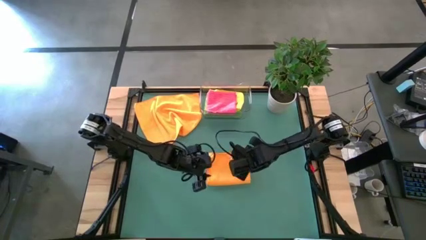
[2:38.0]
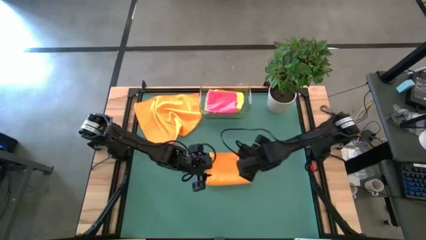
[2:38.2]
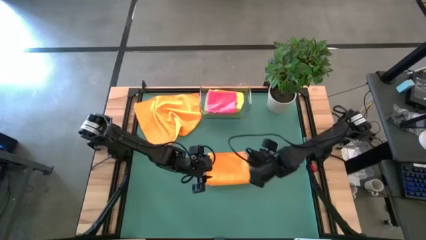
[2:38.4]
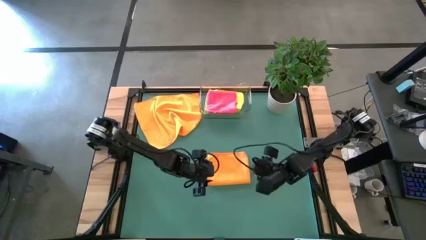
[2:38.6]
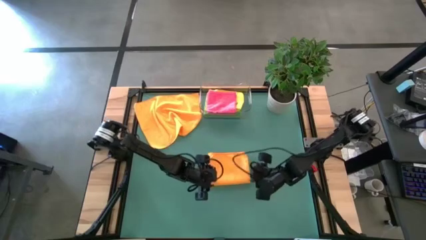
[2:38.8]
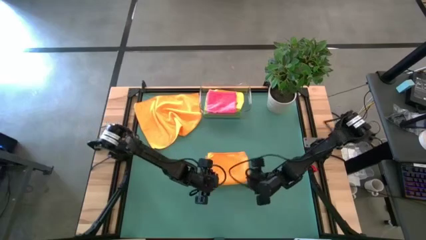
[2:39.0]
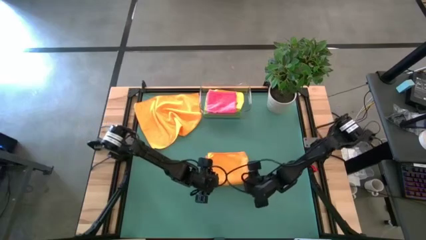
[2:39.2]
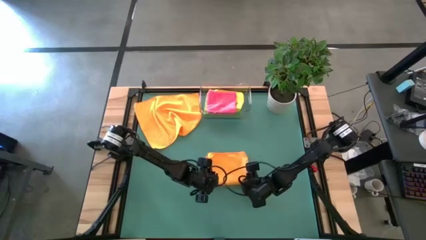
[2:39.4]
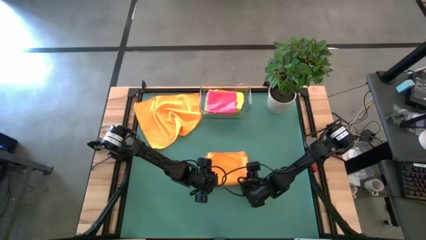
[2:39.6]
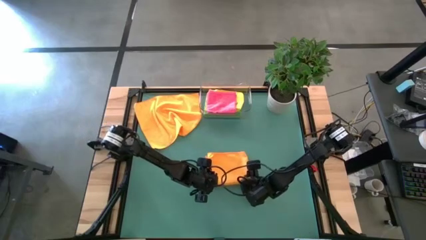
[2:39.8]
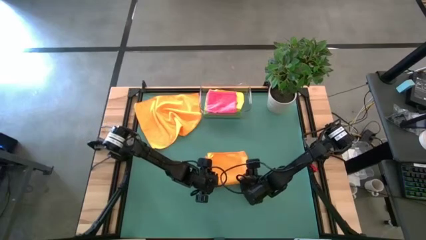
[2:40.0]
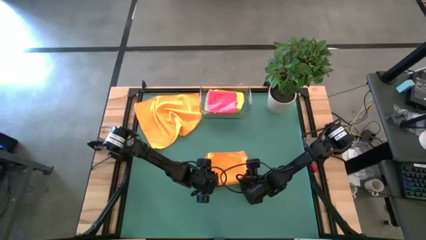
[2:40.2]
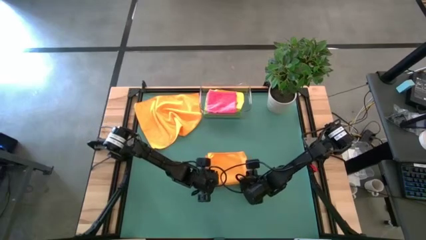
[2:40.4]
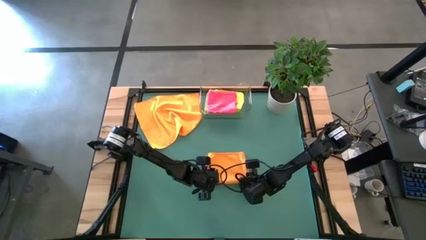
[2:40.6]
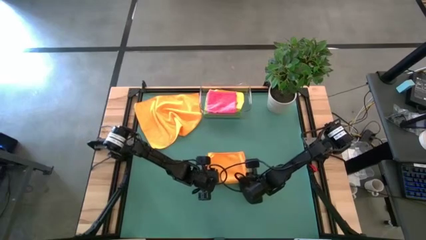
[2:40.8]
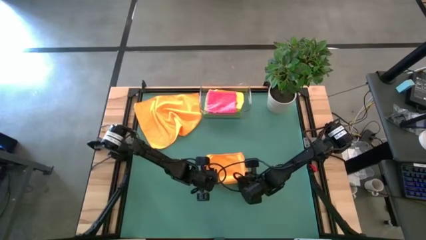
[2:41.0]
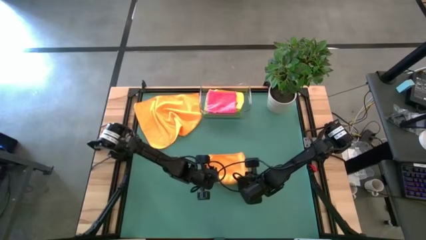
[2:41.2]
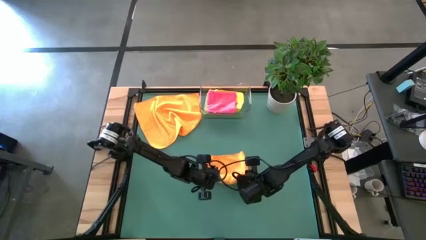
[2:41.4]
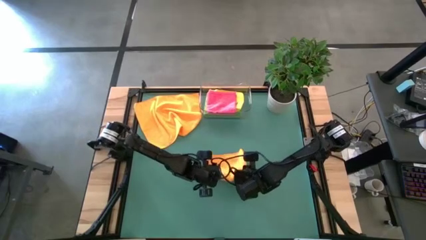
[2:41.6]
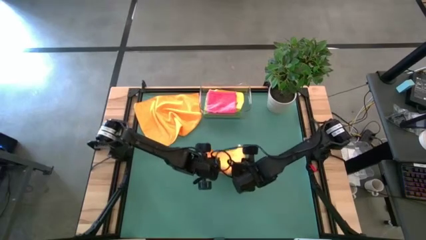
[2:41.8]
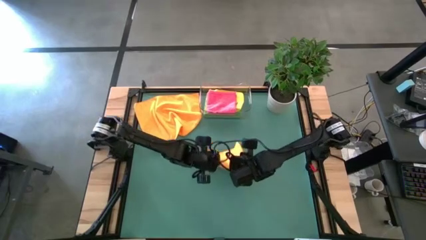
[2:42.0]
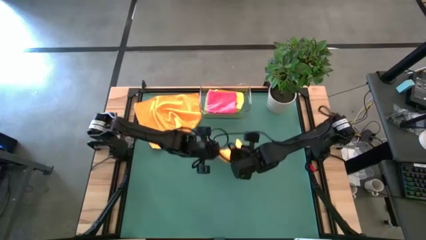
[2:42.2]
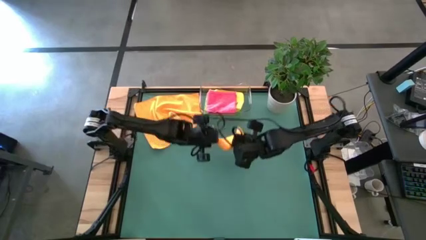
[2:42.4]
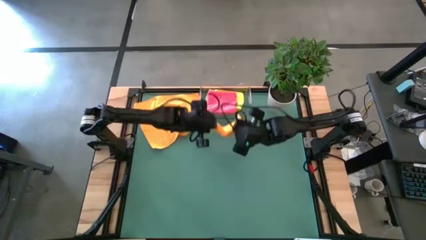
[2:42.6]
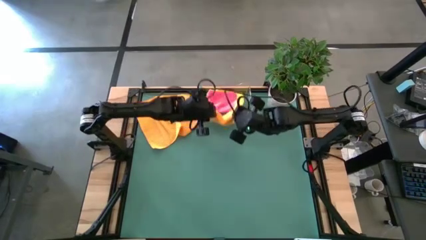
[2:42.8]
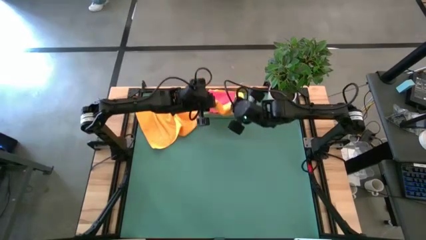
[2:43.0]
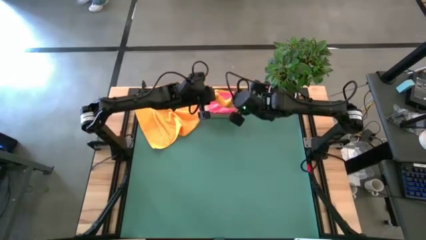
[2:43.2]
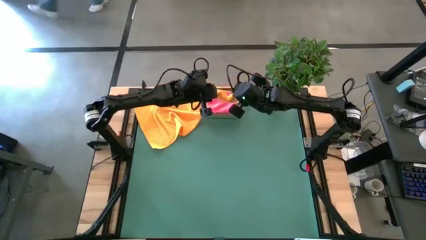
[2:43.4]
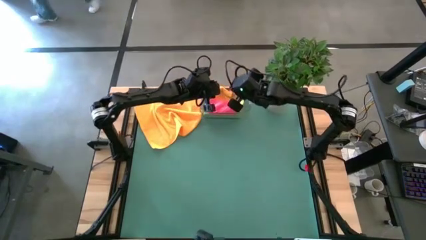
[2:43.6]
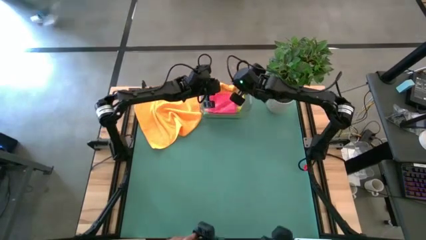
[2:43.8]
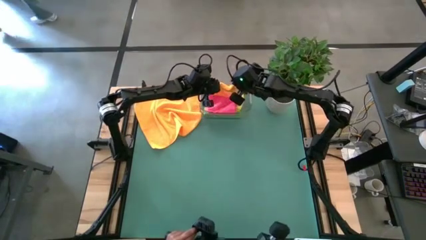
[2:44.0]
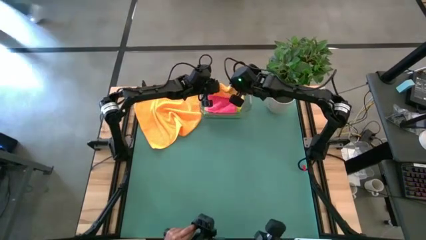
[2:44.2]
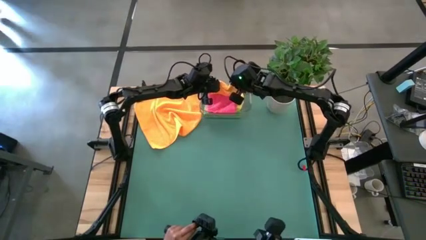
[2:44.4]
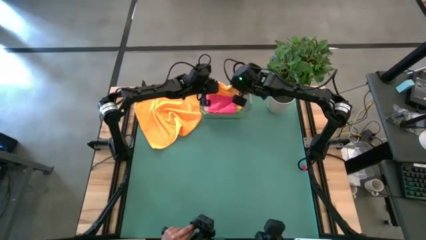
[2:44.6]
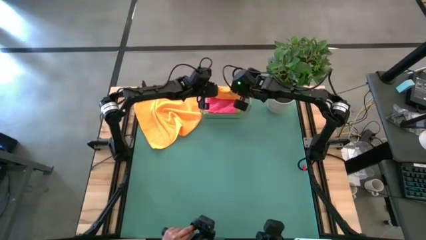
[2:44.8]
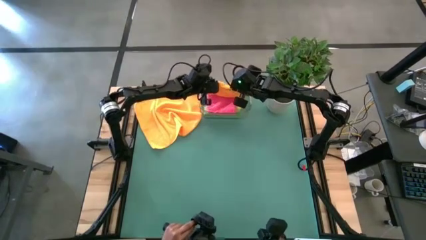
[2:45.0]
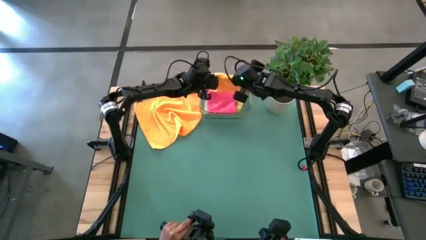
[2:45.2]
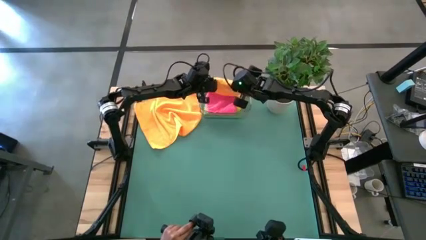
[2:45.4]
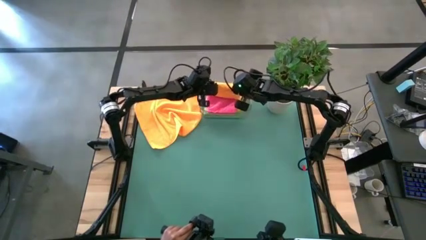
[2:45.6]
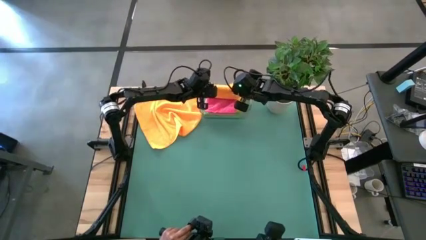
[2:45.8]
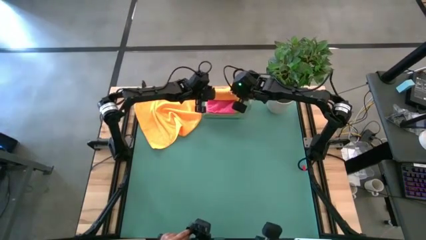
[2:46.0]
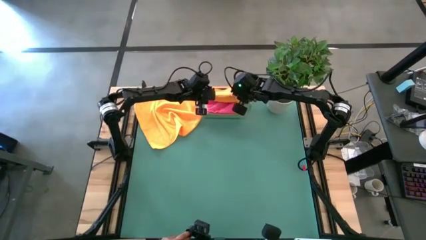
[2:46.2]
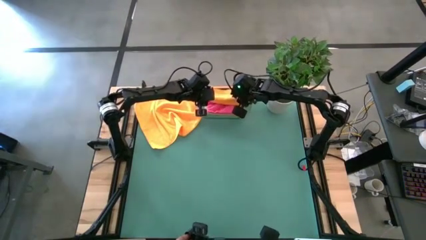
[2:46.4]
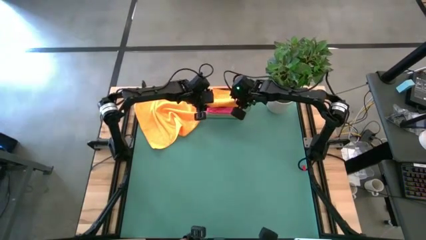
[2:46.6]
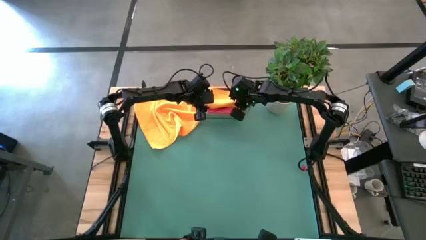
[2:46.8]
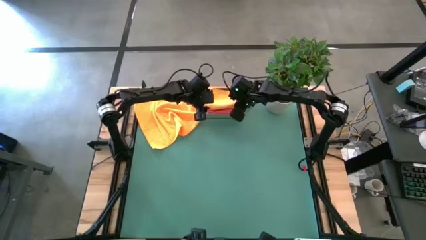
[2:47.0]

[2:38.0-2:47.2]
Task: Fold microfiber towels
Put the folded orange towel into the transparent bin

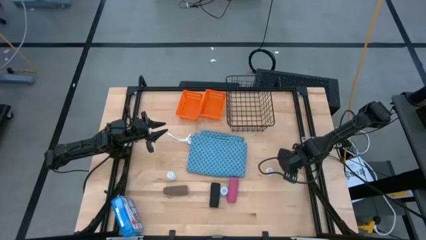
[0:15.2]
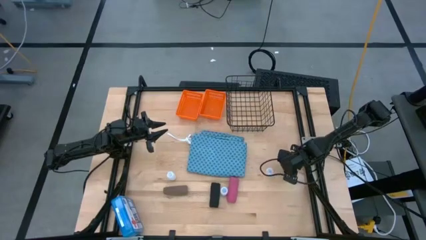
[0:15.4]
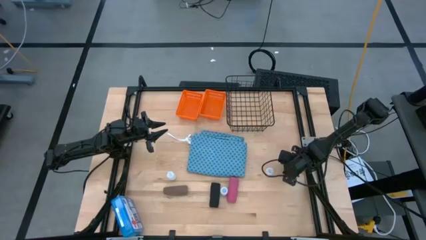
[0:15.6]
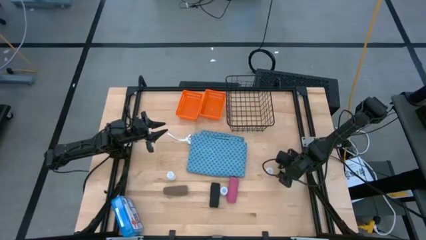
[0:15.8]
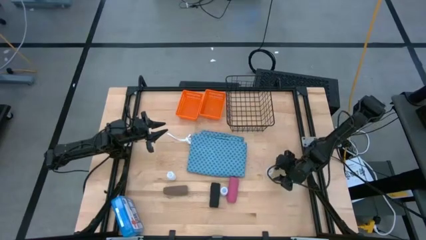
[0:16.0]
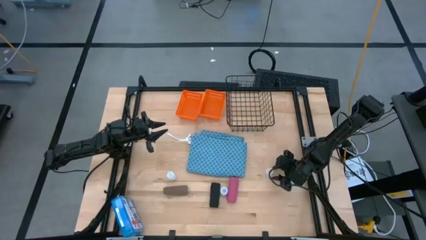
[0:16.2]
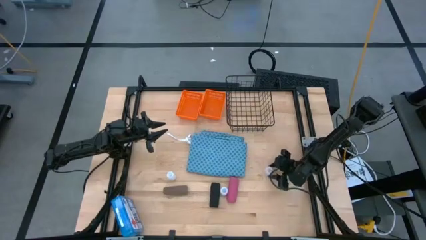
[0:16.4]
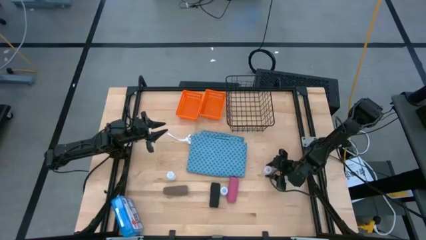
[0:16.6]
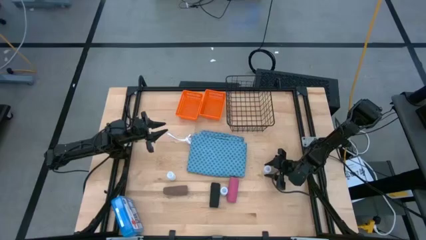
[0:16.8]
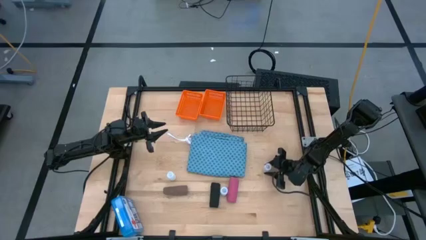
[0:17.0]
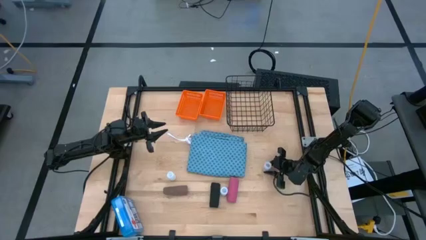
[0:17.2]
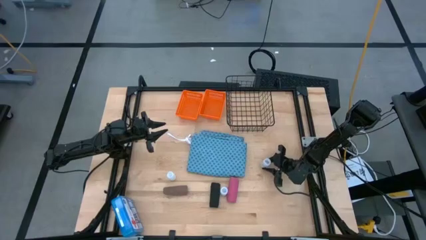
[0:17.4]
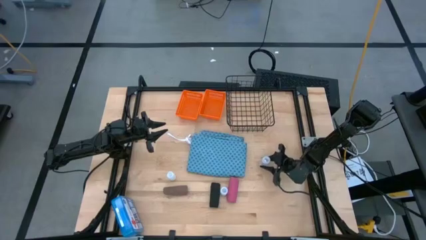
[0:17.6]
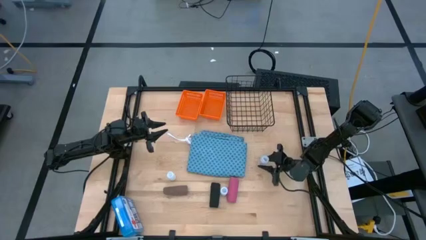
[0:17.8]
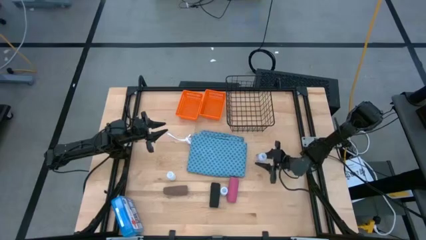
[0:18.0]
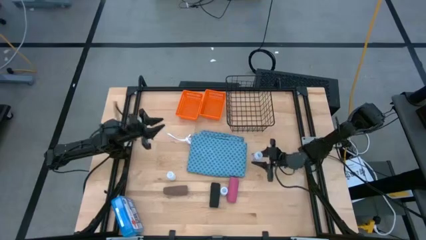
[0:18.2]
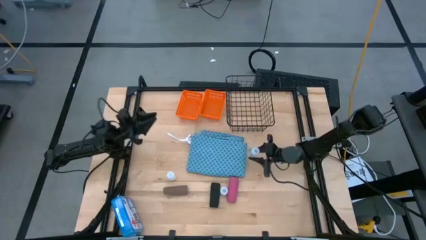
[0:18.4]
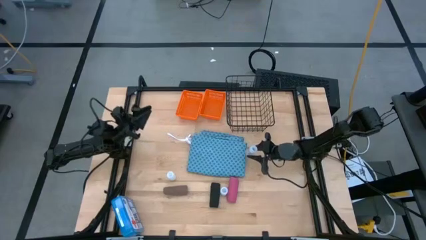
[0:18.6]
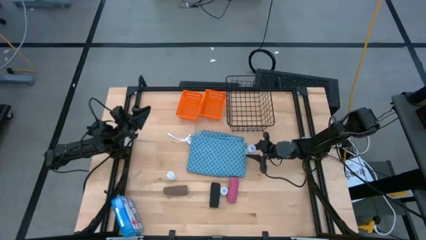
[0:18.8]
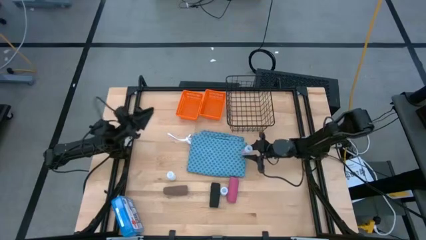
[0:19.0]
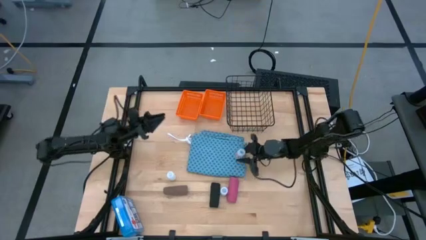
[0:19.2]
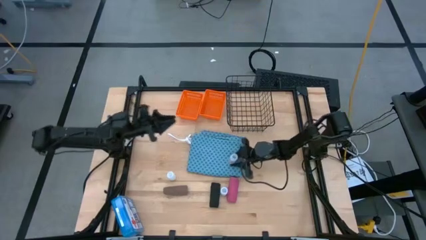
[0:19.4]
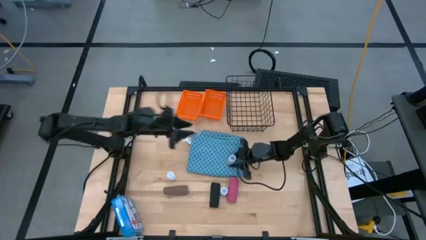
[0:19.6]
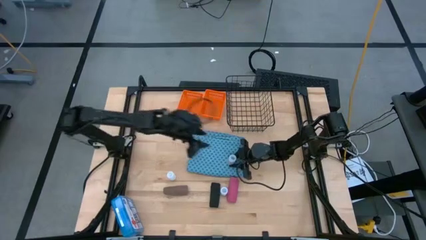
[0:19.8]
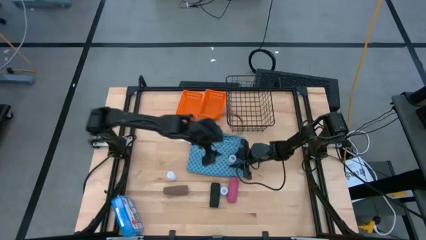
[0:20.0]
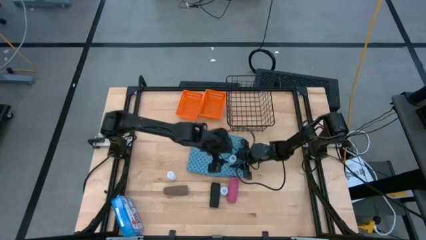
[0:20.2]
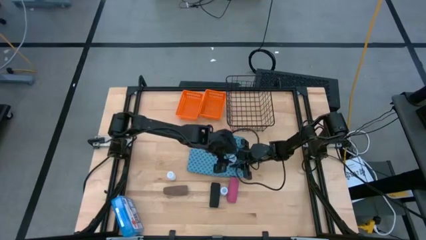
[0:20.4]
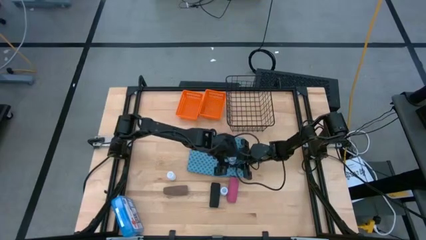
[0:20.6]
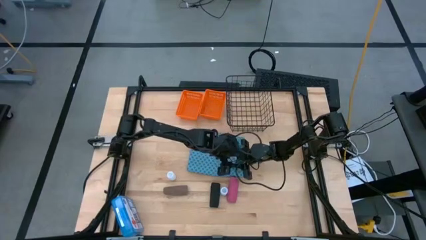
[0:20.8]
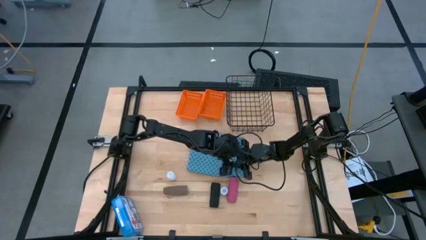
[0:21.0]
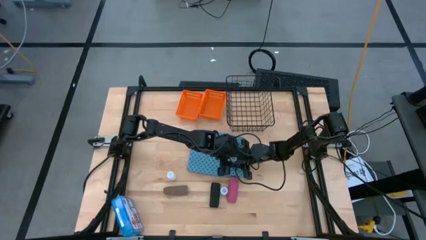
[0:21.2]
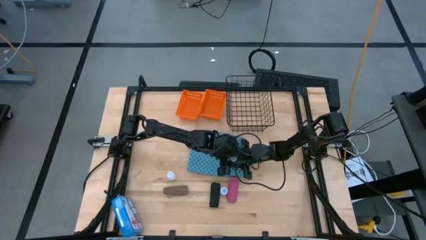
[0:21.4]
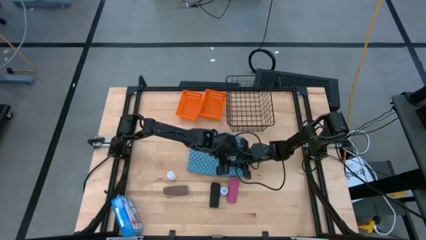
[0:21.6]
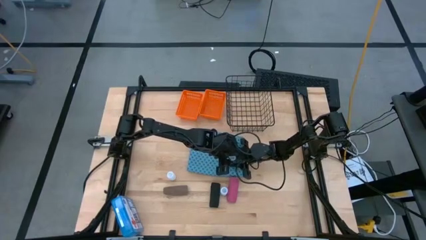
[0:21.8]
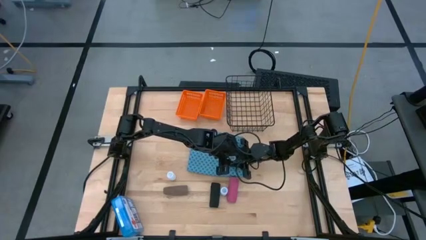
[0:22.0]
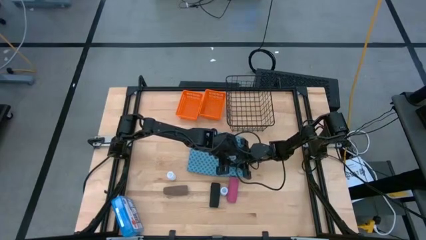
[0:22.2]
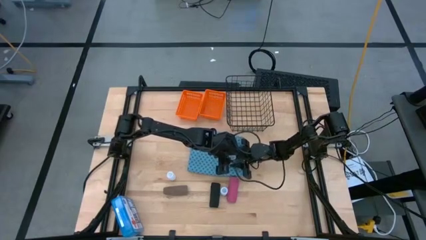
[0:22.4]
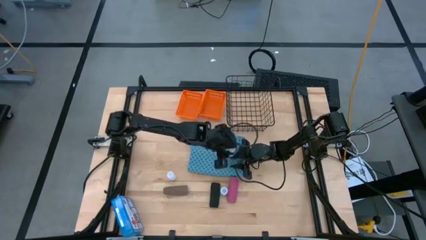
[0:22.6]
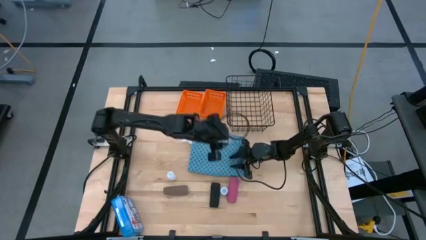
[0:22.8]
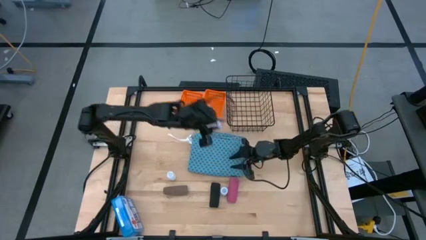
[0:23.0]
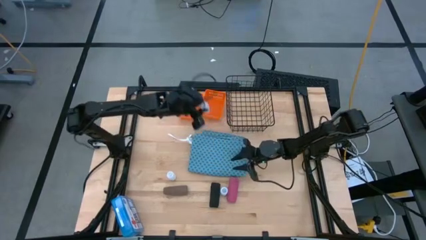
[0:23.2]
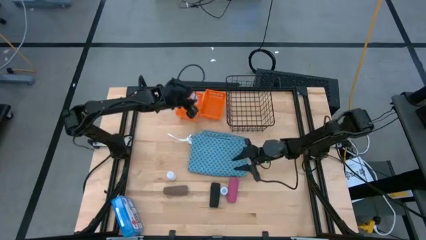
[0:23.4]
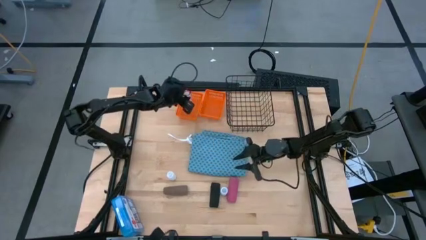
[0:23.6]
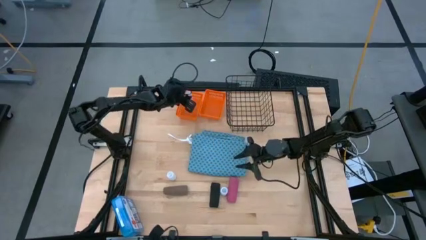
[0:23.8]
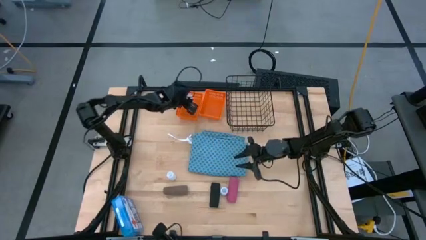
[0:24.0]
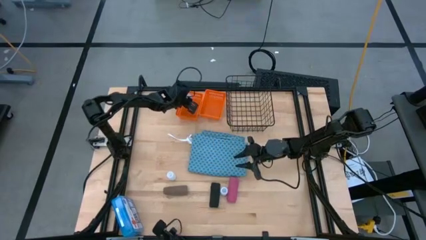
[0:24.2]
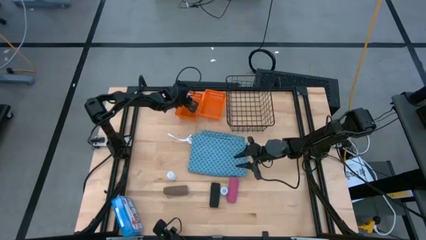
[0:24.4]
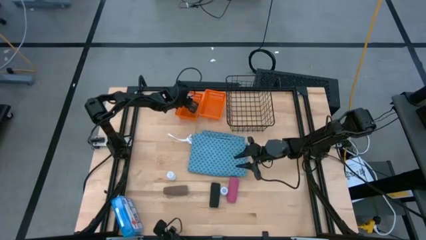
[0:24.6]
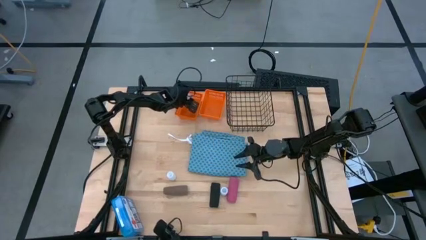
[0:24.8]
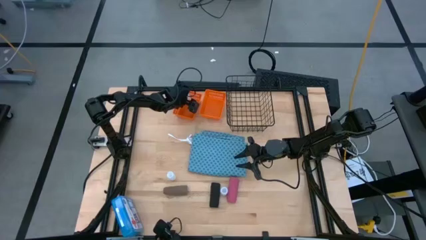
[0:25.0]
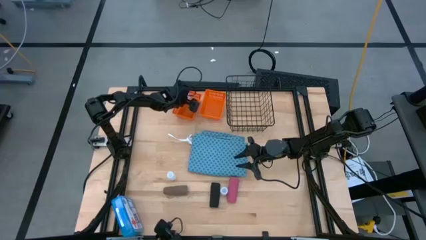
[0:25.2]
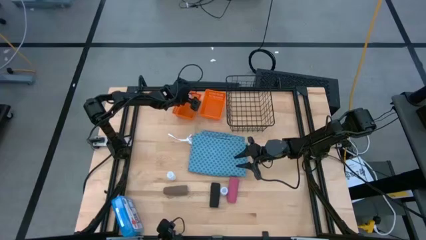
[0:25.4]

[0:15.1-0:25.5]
Task: Pick & Place Medicine items
Put the right transparent pill bottle into the left orange basket
